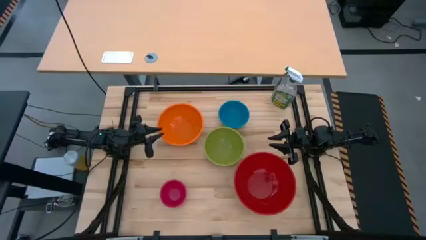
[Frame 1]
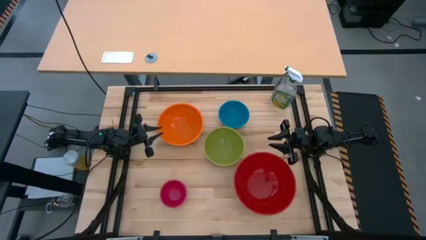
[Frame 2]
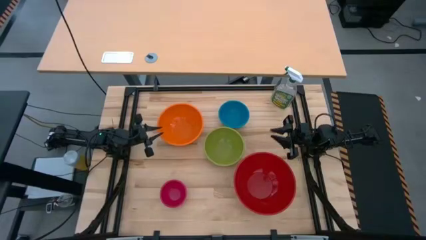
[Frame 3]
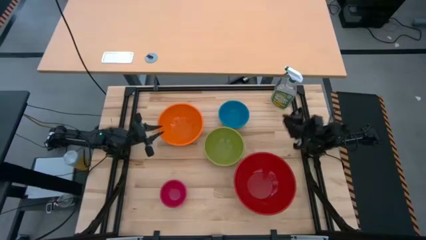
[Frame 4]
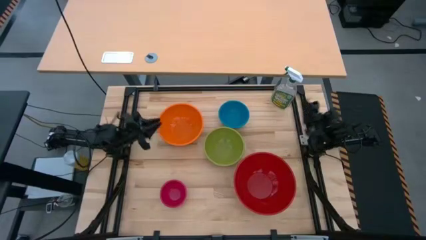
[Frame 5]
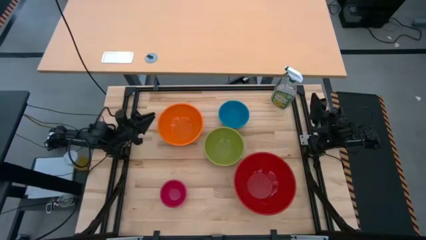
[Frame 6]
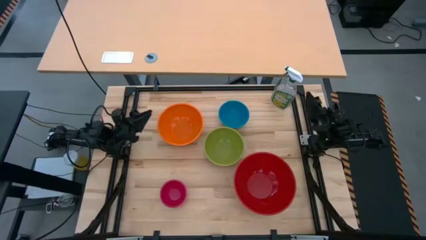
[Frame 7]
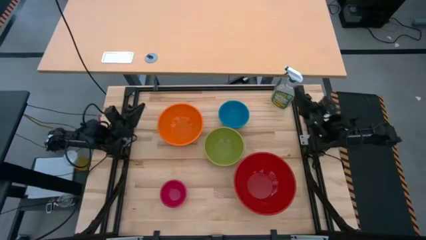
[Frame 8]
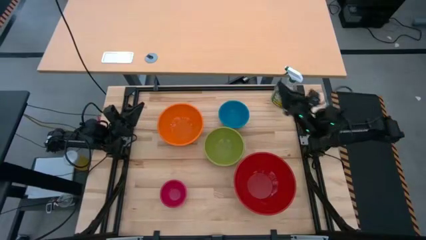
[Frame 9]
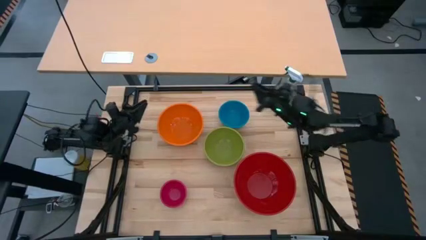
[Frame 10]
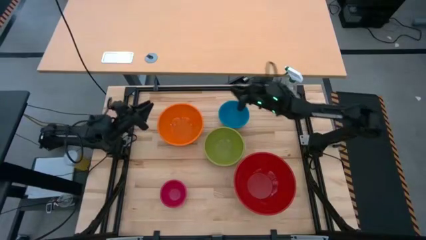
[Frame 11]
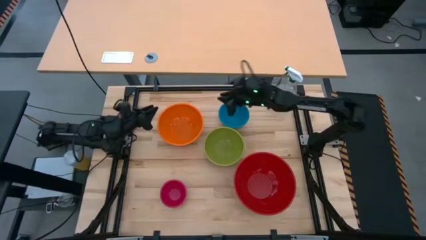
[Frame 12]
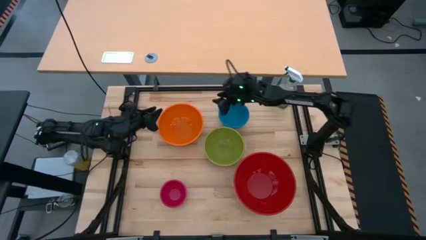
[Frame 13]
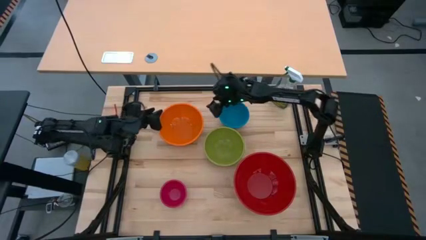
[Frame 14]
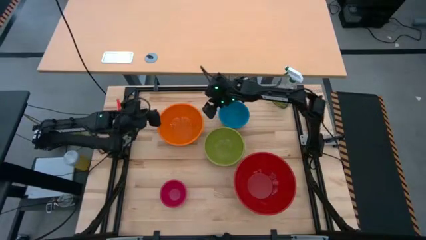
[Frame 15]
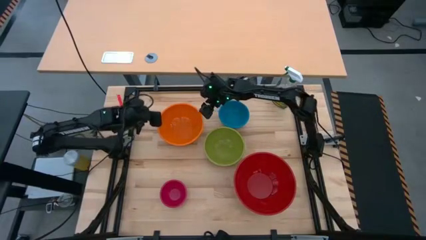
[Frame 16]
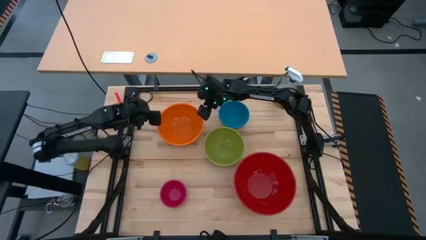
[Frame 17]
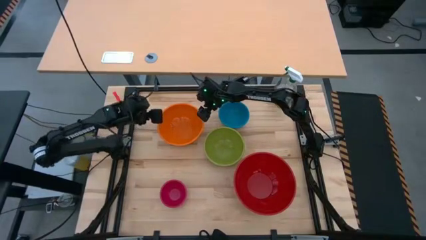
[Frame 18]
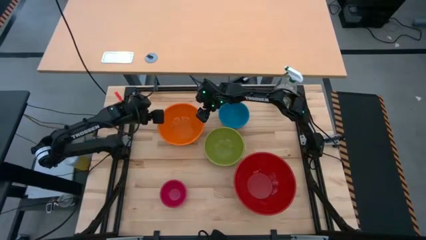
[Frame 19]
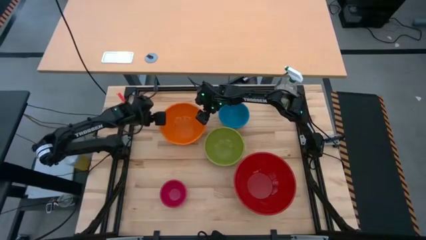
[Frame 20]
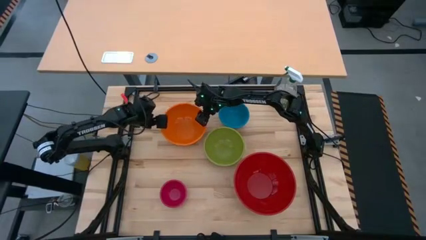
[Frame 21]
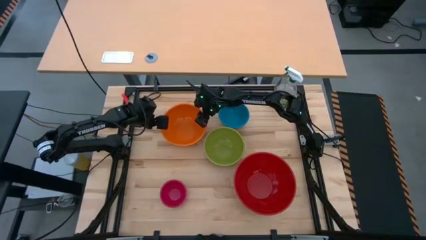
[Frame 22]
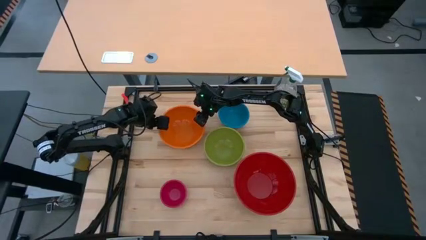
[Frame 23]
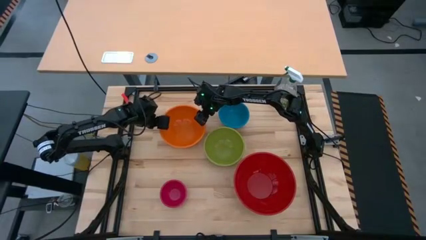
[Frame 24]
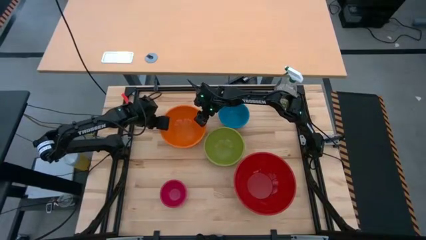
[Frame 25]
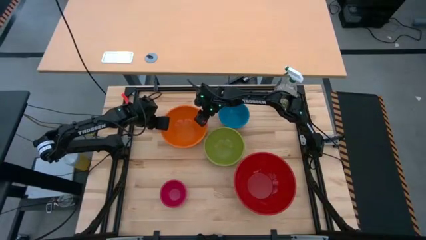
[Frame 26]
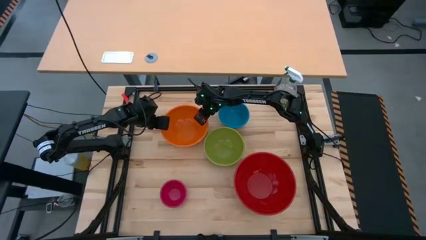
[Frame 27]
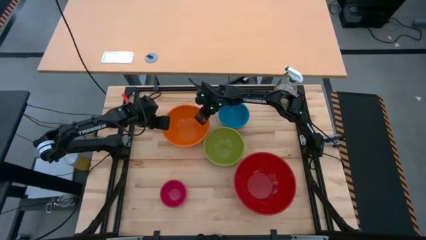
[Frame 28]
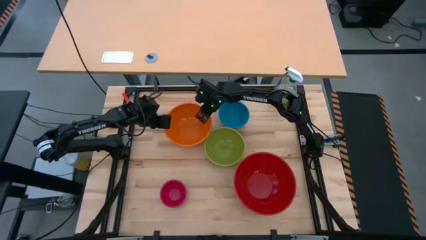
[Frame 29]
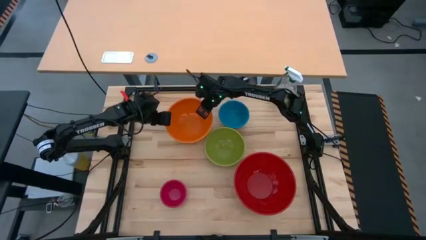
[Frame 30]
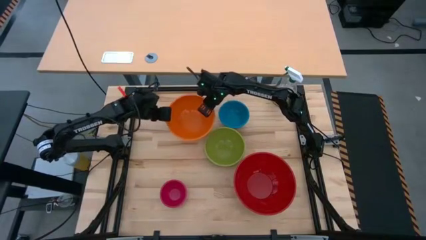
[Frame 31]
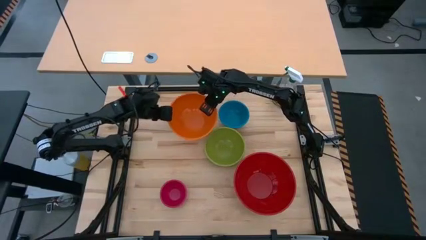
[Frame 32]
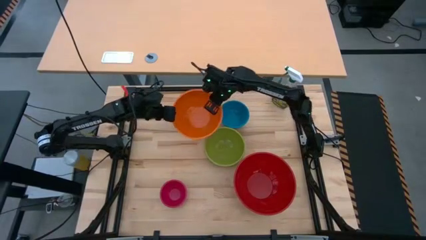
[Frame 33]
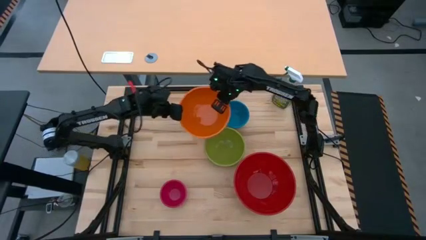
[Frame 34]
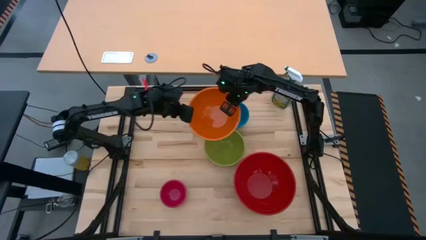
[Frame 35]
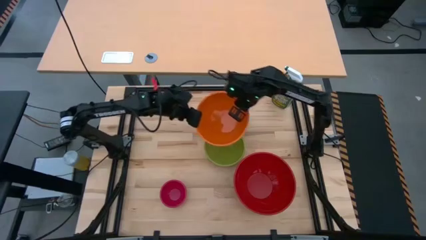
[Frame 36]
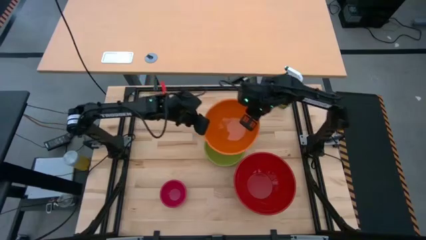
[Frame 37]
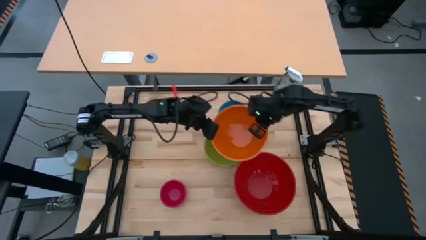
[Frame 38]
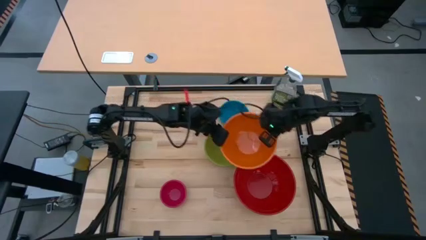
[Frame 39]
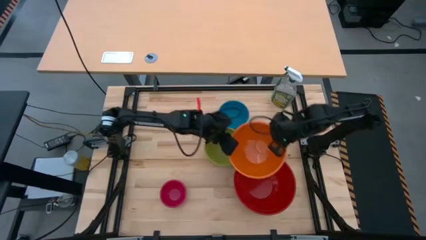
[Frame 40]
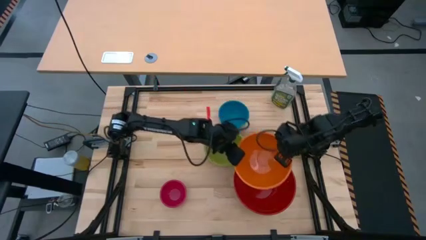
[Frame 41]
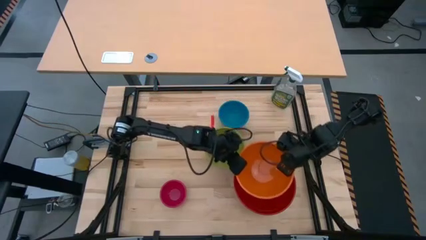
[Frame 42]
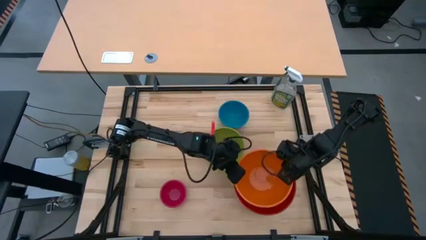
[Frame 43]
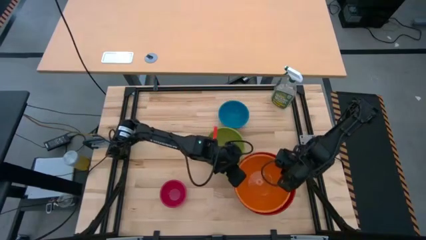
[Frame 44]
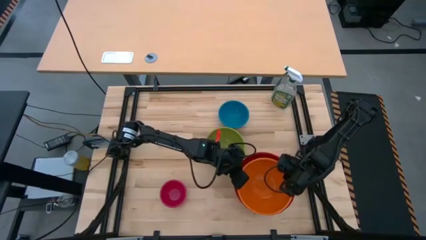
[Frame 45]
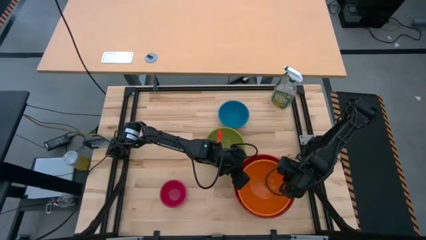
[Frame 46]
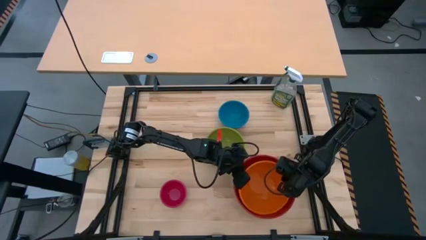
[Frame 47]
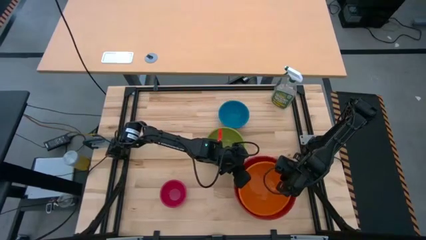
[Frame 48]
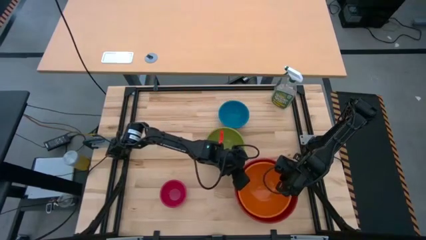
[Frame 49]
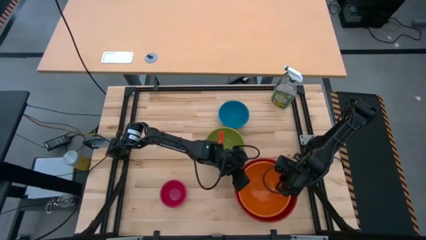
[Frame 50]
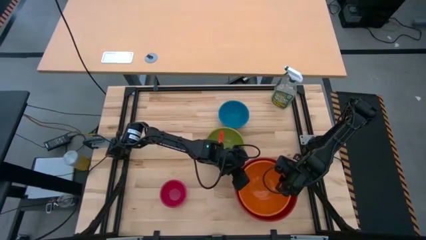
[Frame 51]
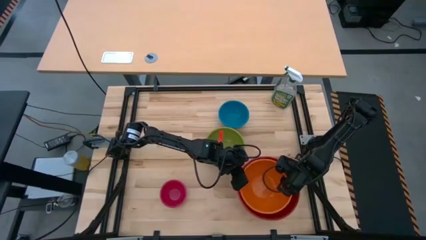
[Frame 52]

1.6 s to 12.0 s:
Task: Nest bowls inside each other by size order
Stack the orange bowl on top of the red bowl

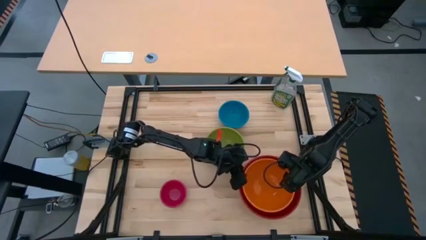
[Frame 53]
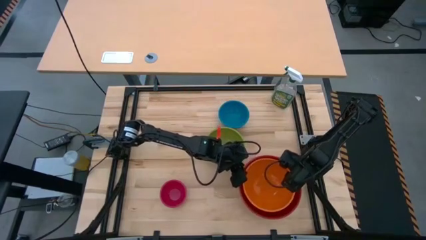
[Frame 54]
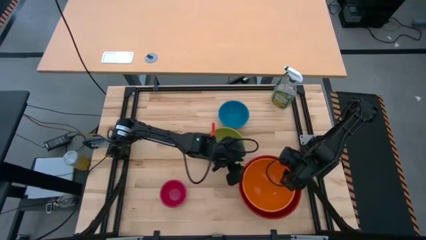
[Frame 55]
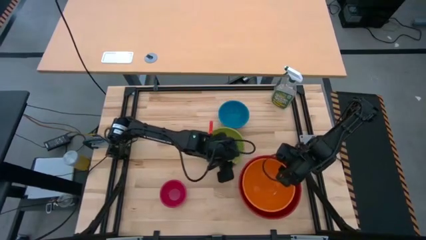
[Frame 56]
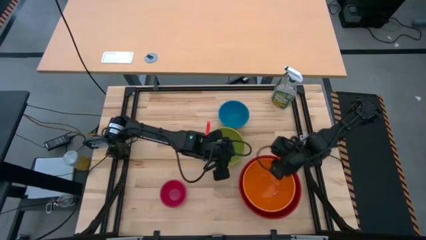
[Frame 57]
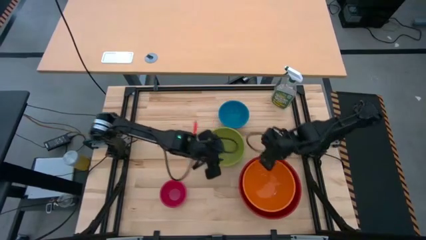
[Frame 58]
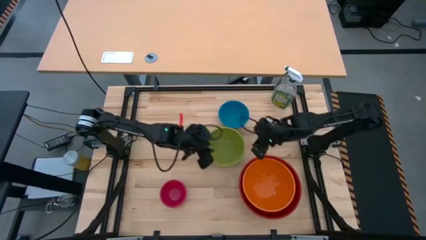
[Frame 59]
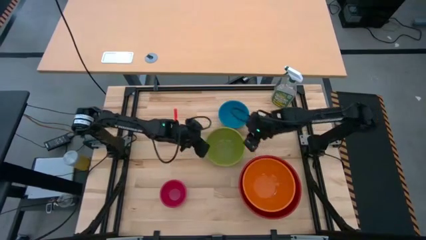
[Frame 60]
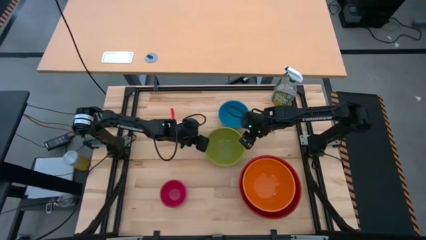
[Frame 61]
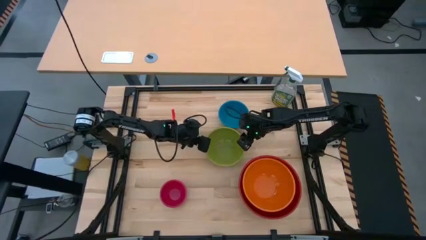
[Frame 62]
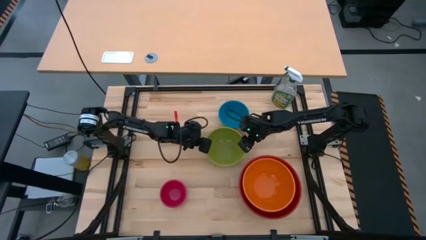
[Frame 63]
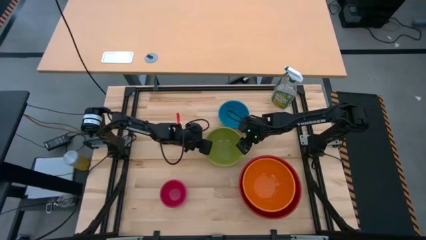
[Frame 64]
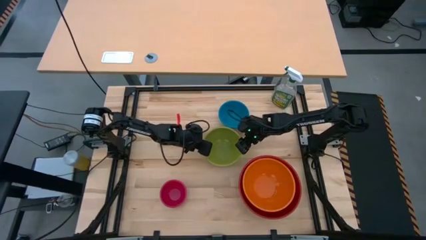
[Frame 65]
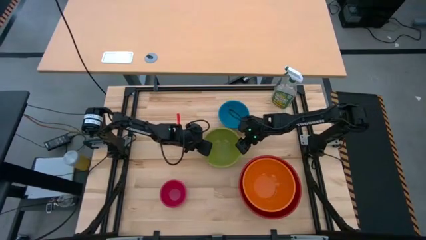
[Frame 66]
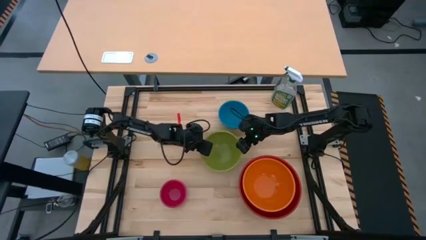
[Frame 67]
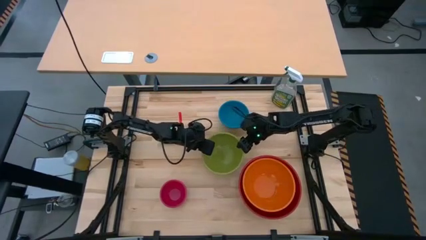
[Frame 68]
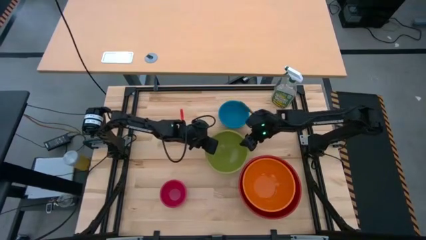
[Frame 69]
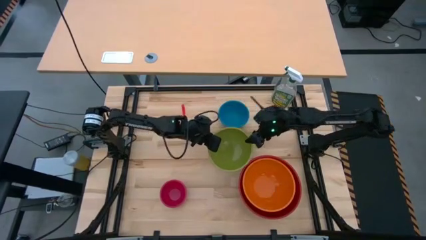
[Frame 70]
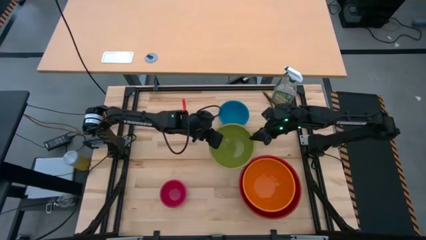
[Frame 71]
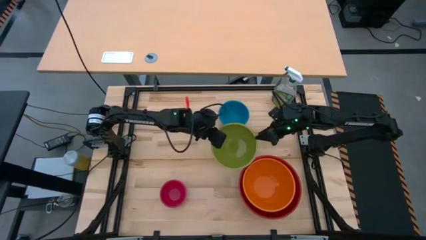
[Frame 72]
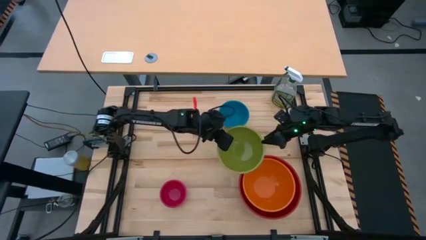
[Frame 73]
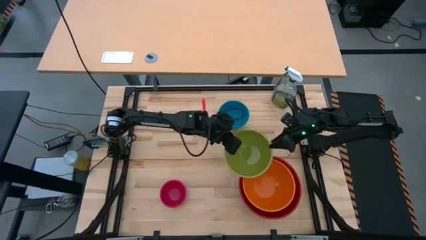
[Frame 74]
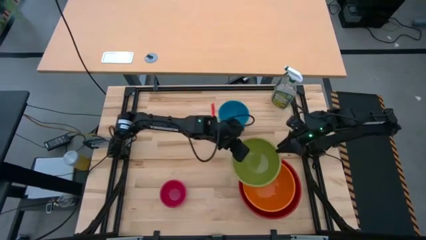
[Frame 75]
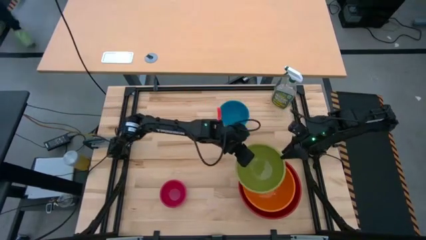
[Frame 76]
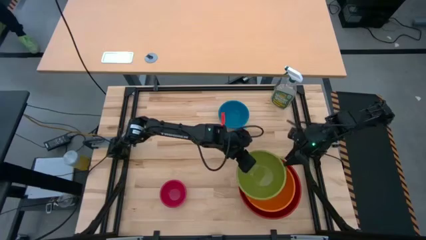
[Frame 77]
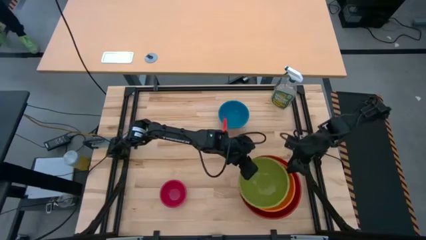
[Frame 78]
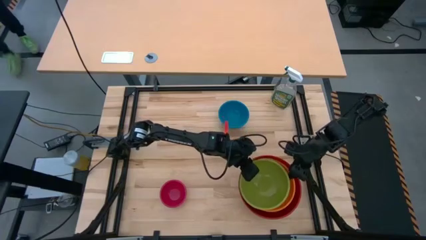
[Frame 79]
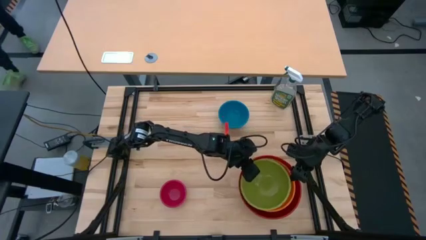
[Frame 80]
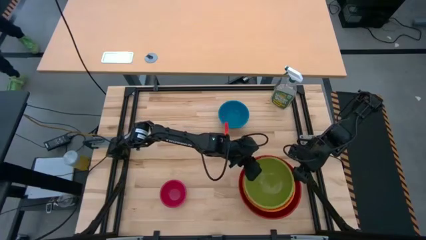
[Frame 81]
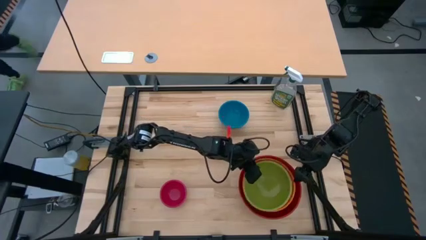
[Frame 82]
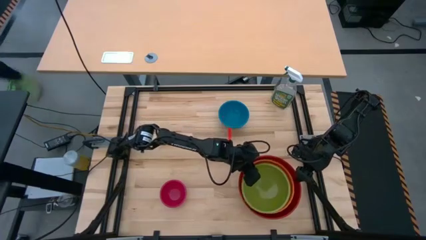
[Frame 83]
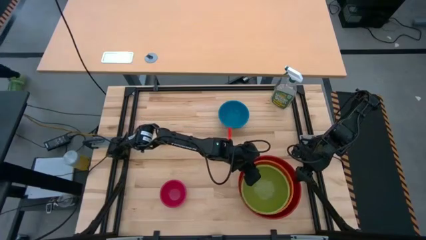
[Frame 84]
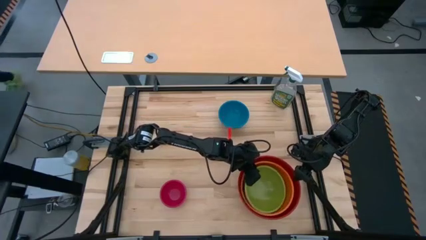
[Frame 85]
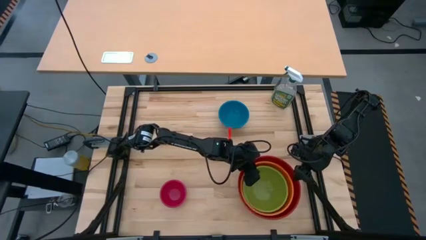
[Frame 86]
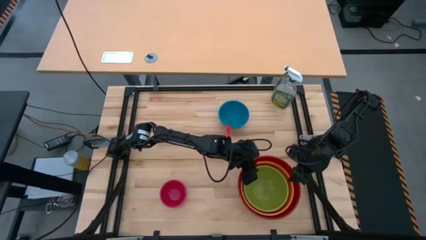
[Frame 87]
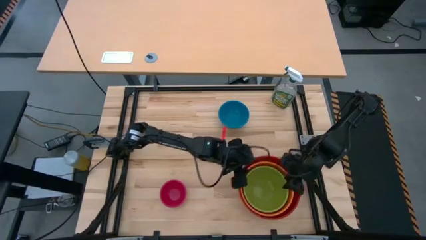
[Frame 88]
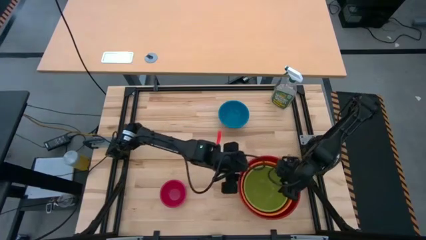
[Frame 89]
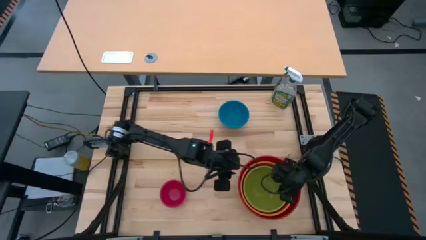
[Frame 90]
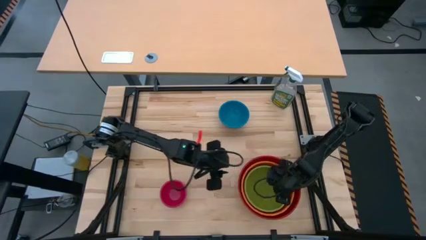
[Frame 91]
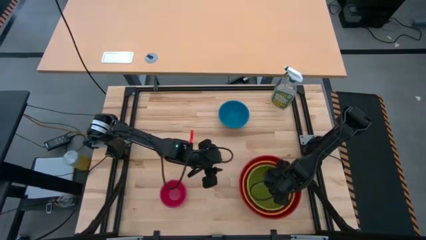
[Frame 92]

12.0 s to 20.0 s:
Stack the green bowl on top of the orange bowl
